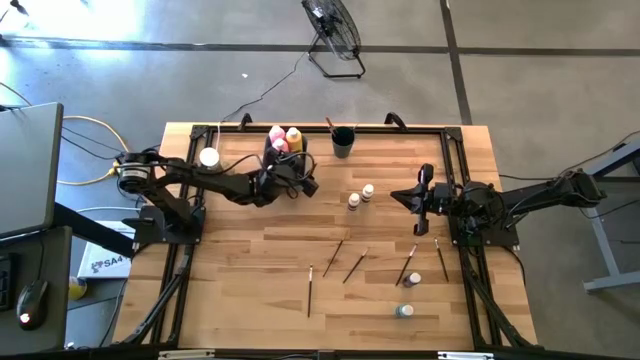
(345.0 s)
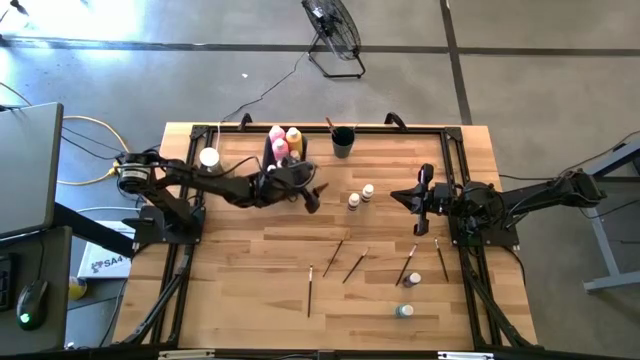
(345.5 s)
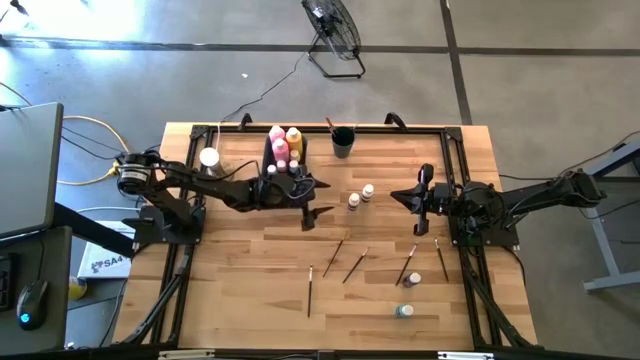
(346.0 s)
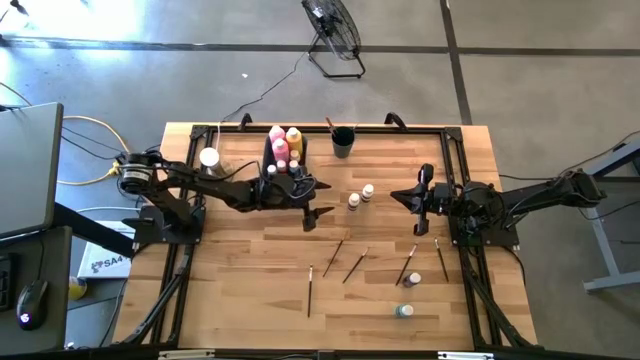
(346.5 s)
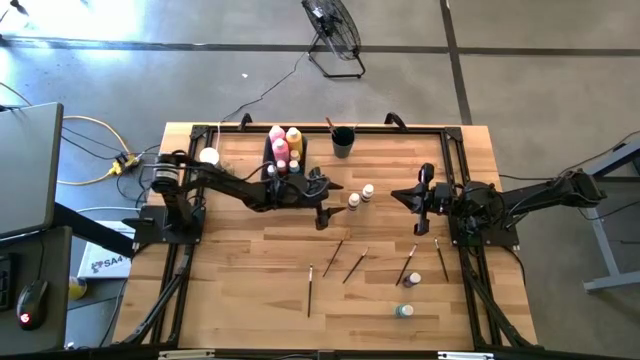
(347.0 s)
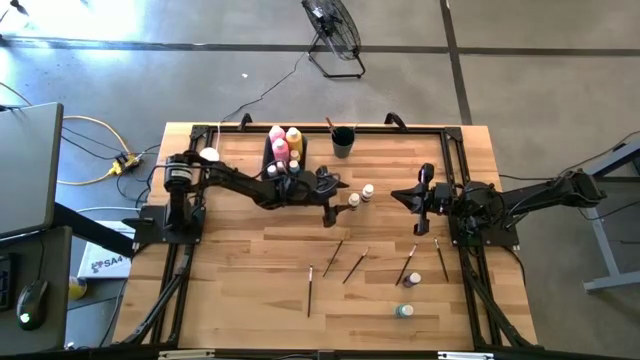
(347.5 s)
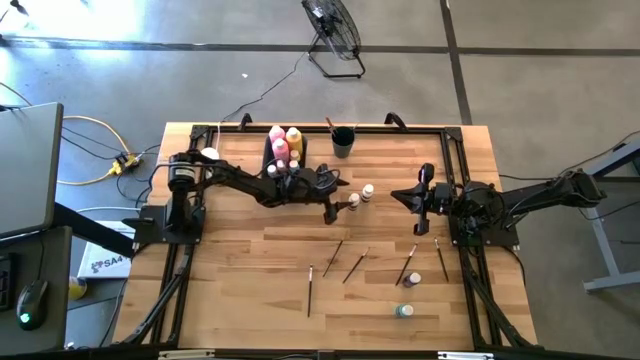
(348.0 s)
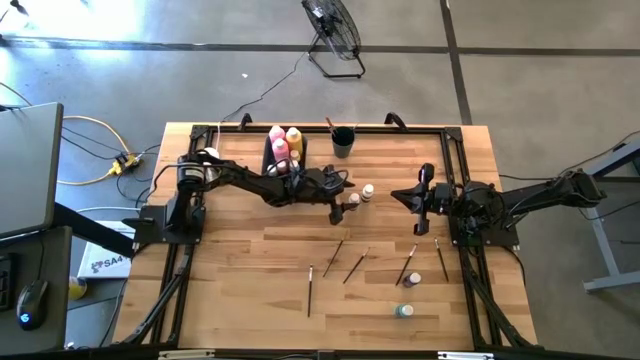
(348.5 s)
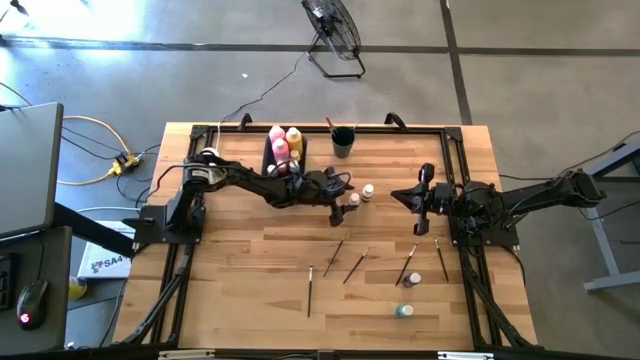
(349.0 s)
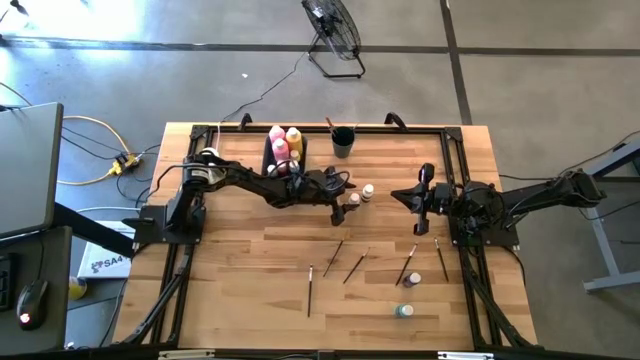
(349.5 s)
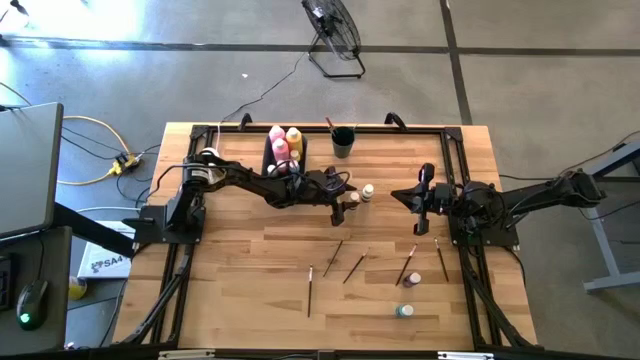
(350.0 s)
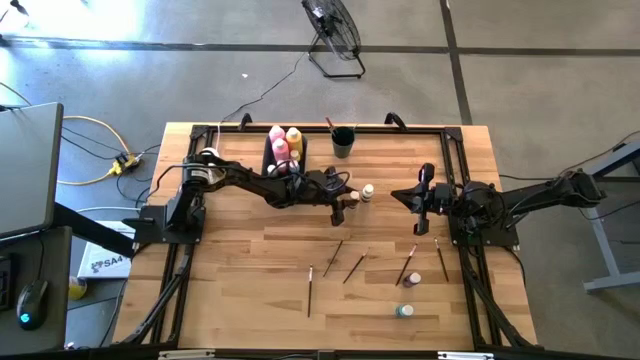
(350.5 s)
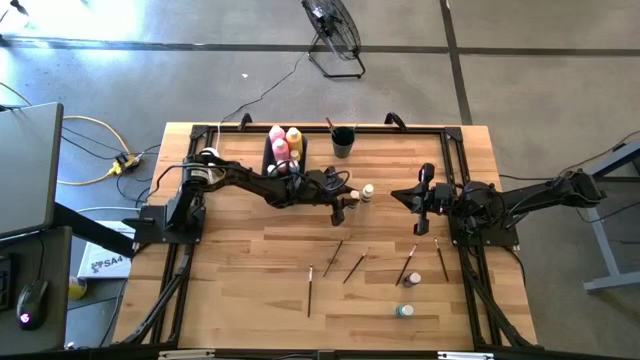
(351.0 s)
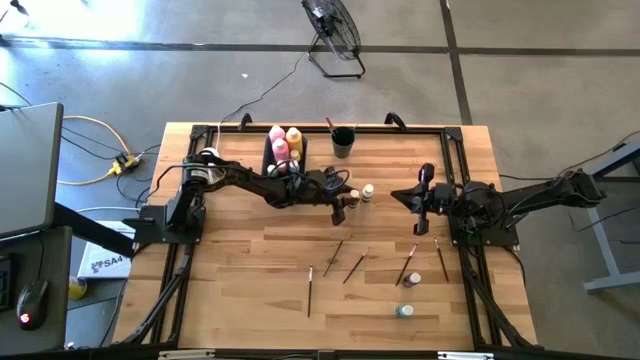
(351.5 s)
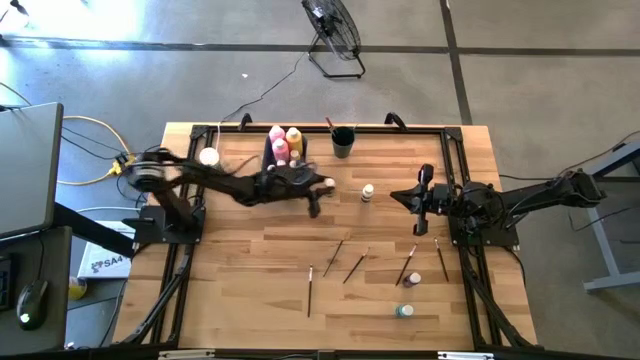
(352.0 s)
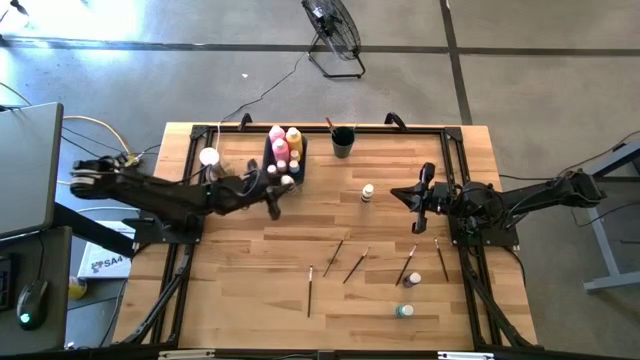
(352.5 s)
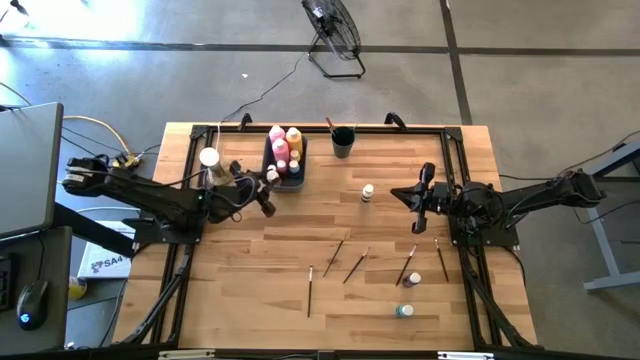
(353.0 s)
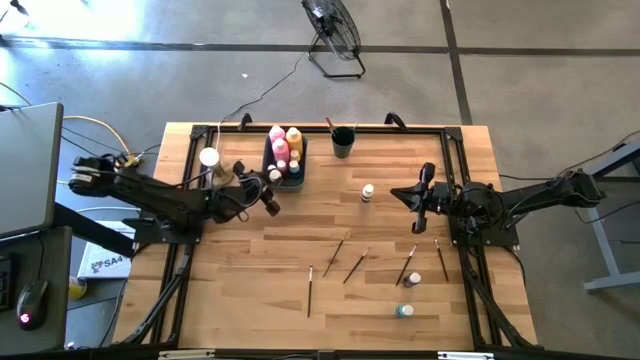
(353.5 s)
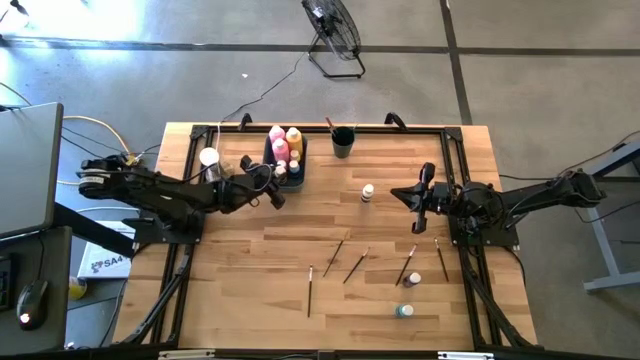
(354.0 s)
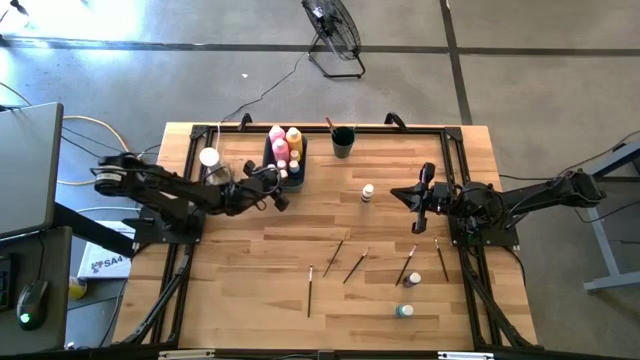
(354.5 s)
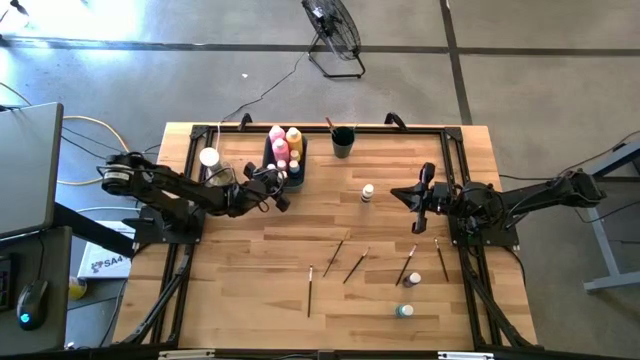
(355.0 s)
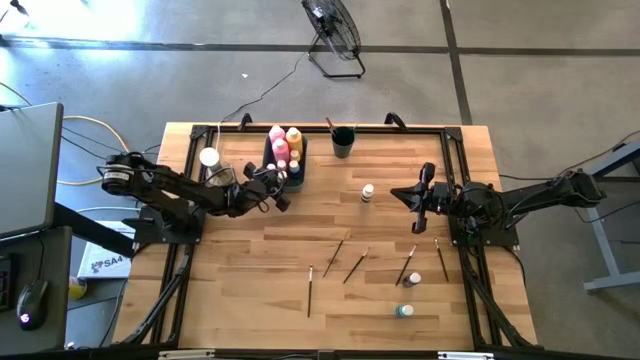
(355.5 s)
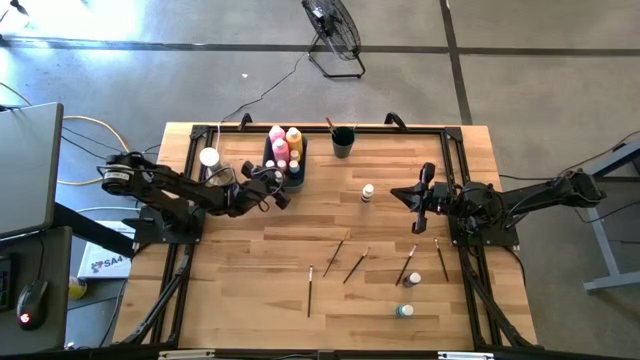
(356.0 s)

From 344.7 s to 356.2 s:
Task: Pick & Place Paint Supplies
Put the small white paint bottle into the green bin

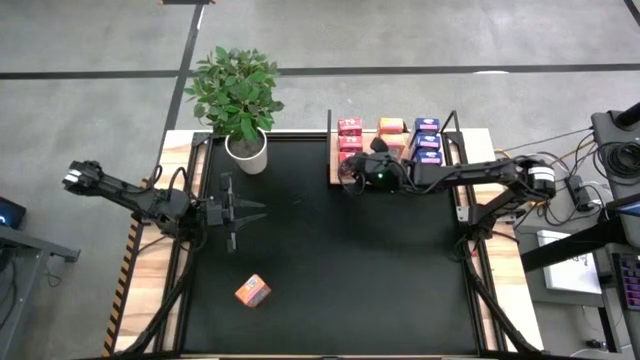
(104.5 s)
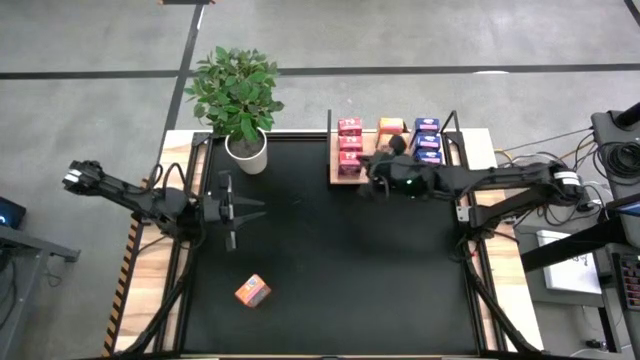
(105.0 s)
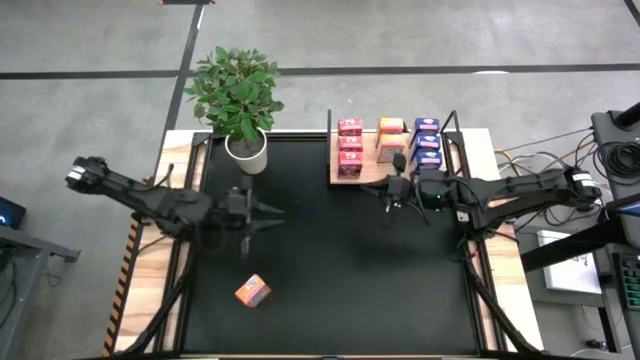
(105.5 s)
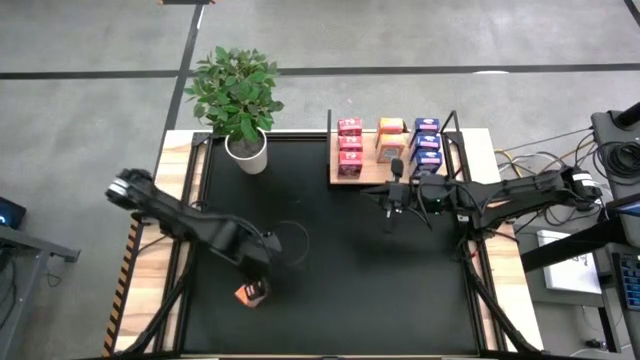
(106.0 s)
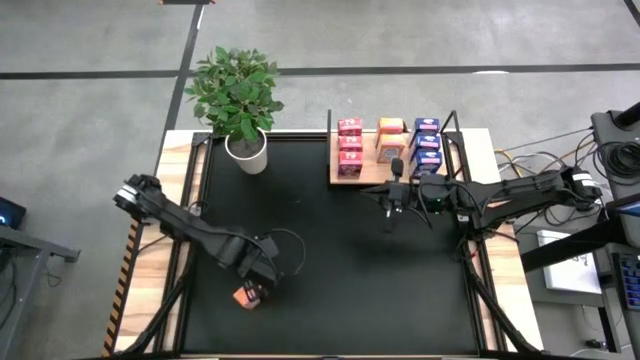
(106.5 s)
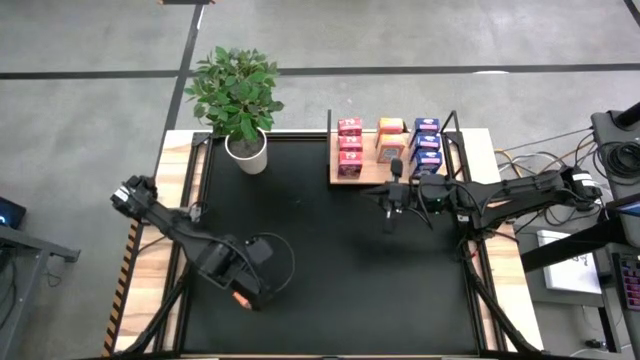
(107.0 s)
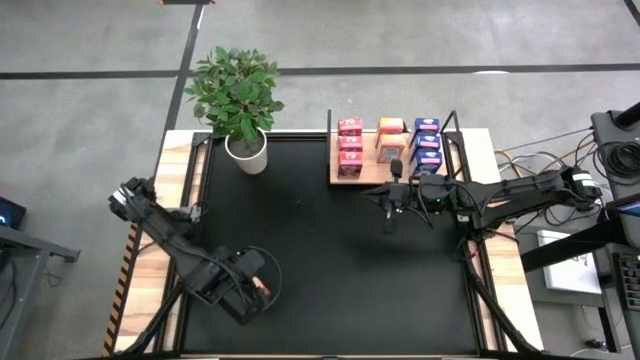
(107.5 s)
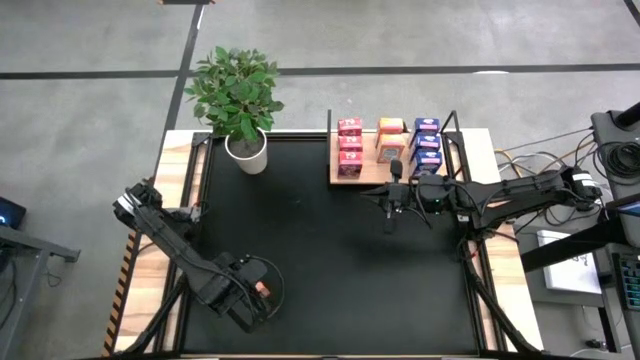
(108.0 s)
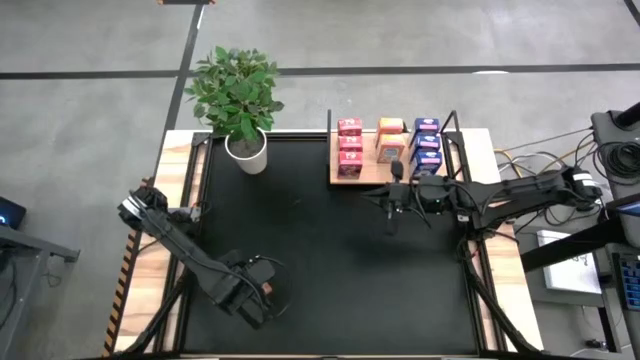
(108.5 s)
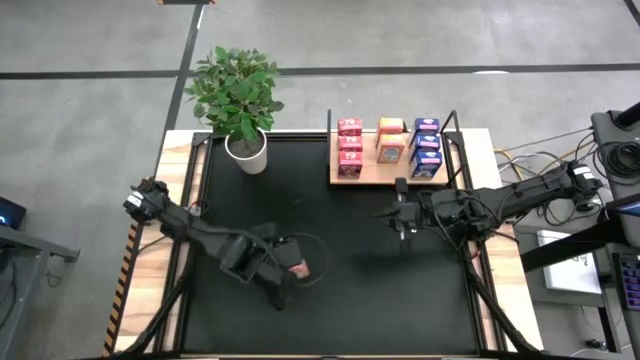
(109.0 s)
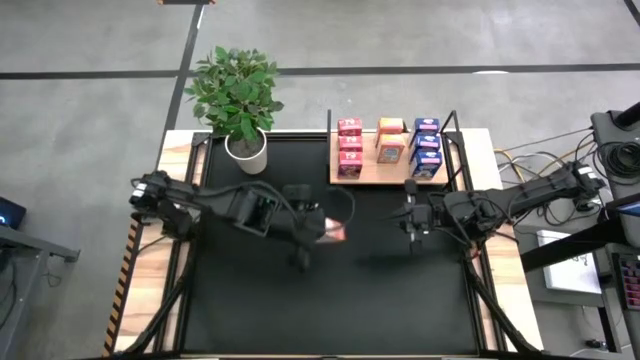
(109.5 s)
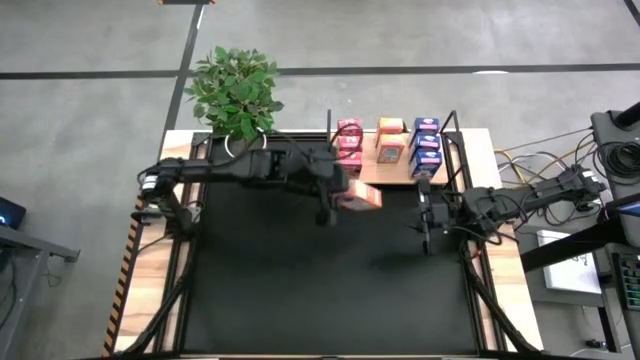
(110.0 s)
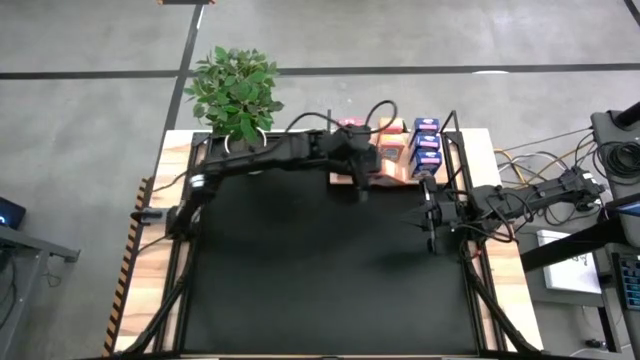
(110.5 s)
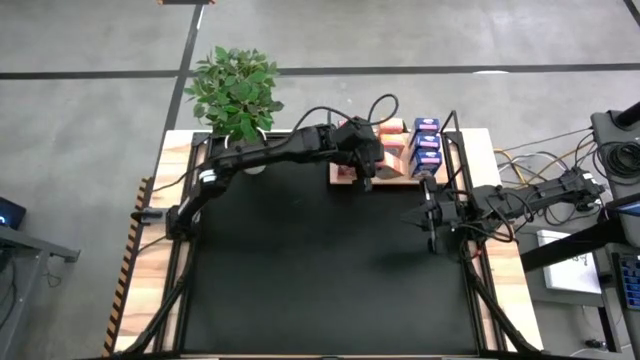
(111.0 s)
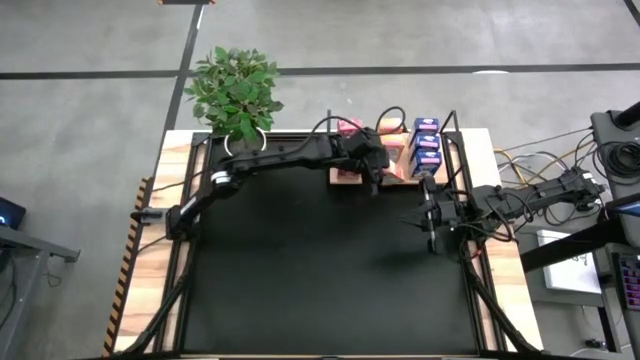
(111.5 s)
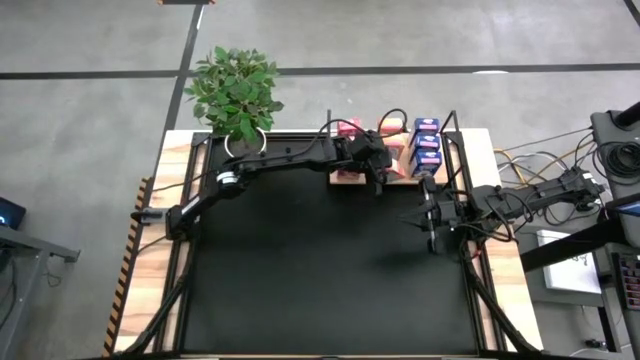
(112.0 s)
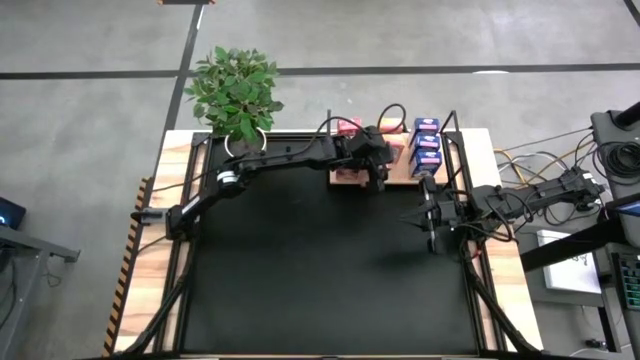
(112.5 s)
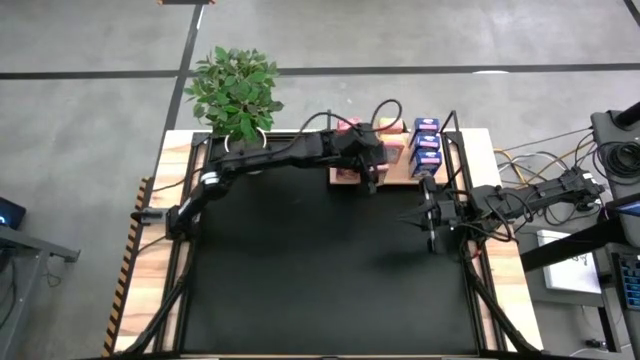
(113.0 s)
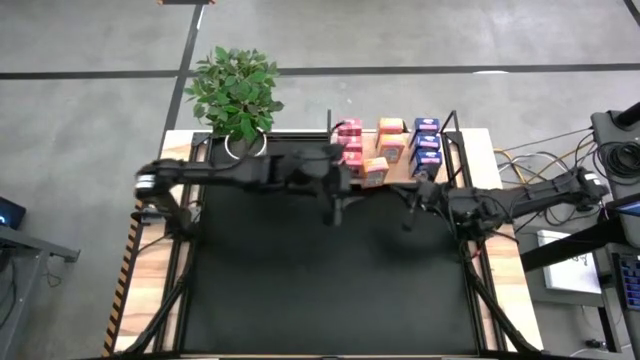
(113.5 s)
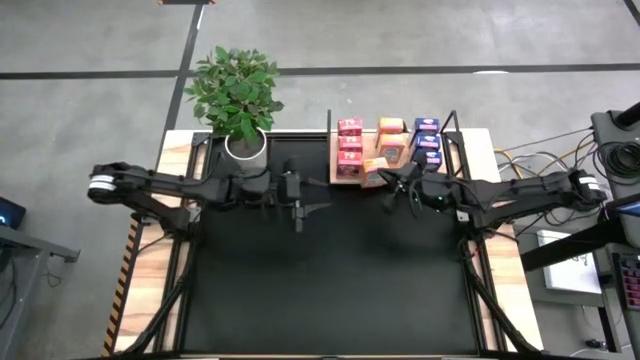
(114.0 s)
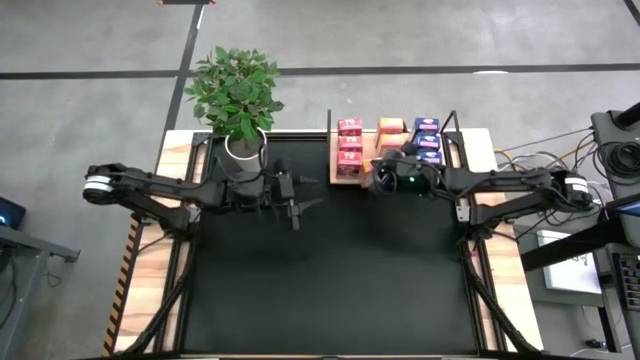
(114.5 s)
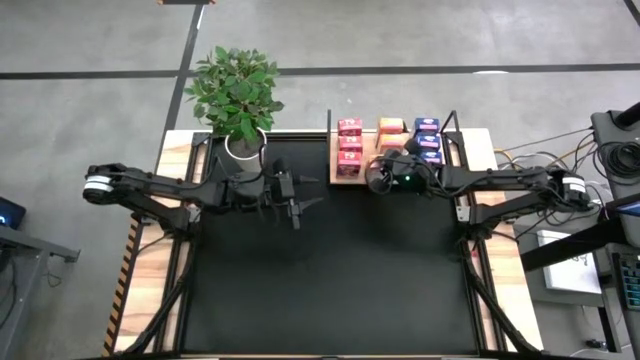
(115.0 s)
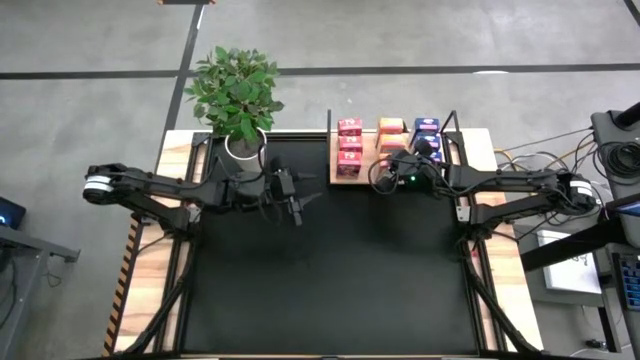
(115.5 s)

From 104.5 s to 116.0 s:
Task: Stack cereal on shelf
Put the orange cereal box on the shelf aligned with other orange cereal box
